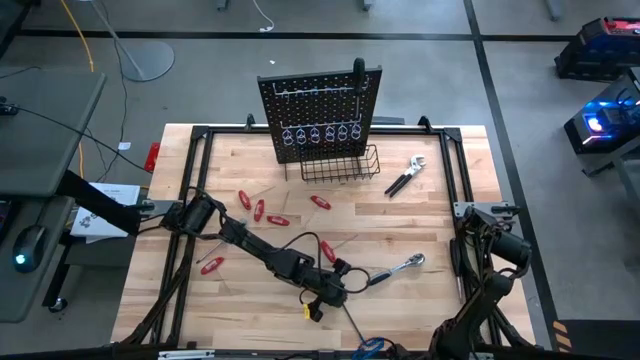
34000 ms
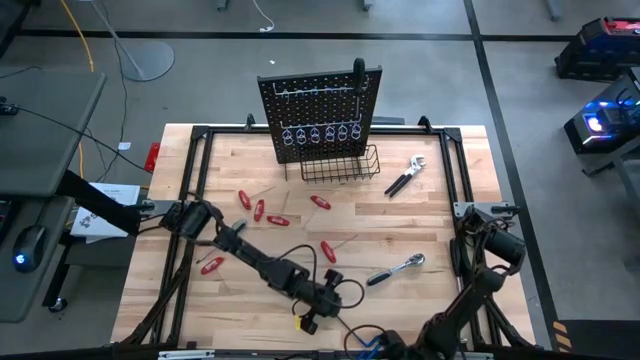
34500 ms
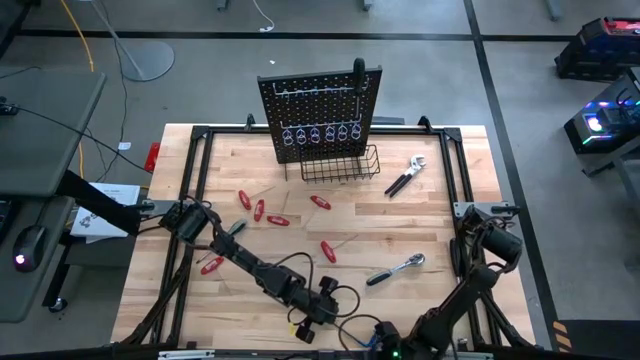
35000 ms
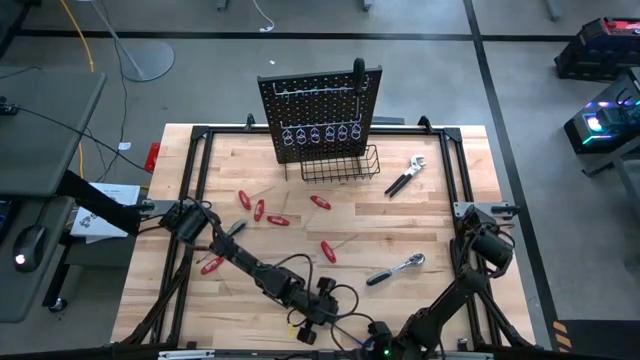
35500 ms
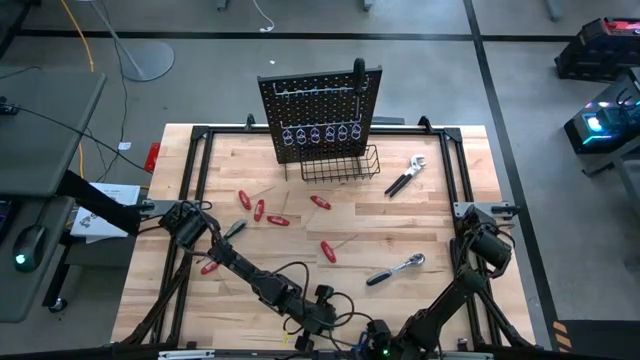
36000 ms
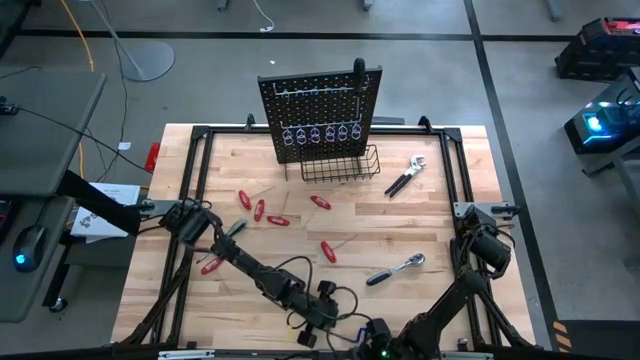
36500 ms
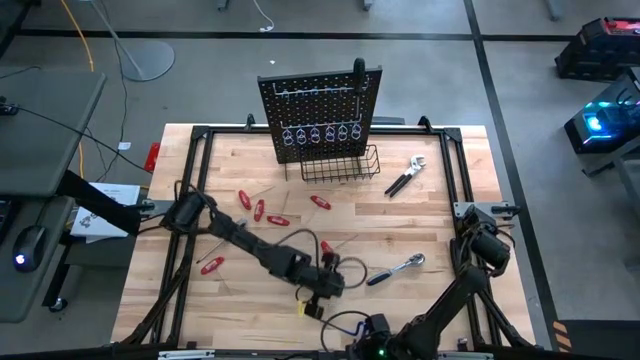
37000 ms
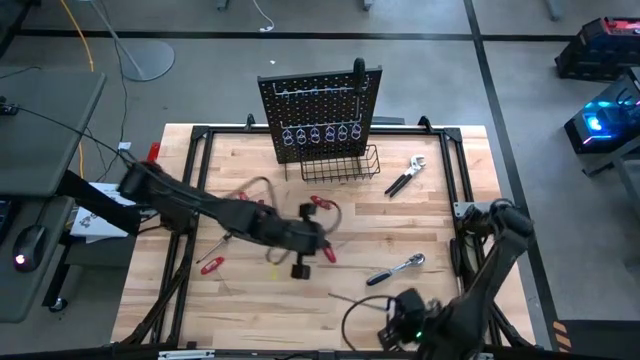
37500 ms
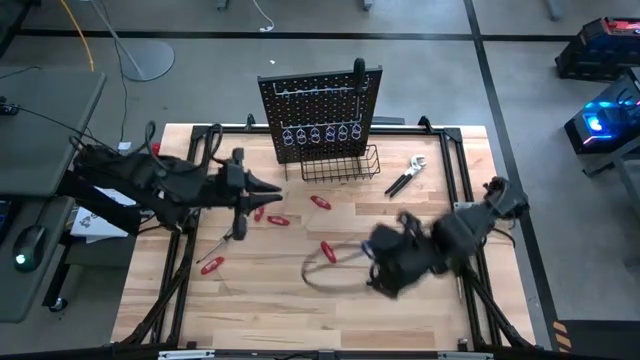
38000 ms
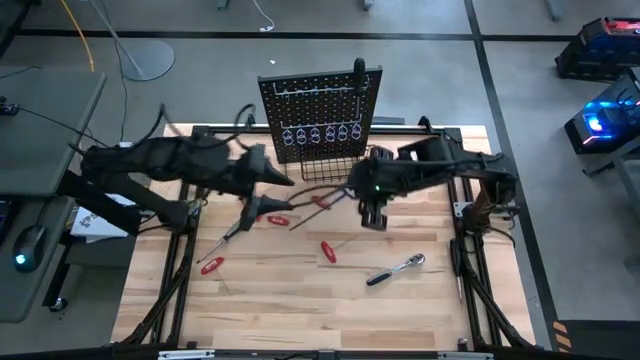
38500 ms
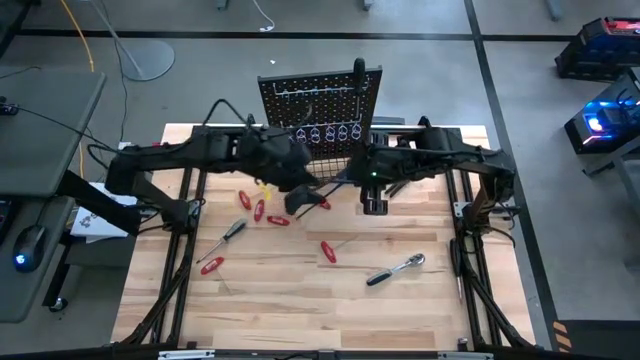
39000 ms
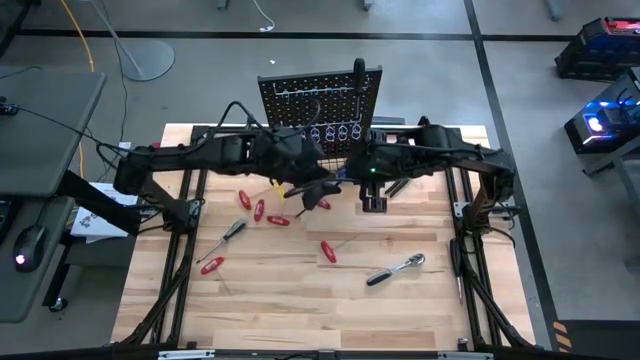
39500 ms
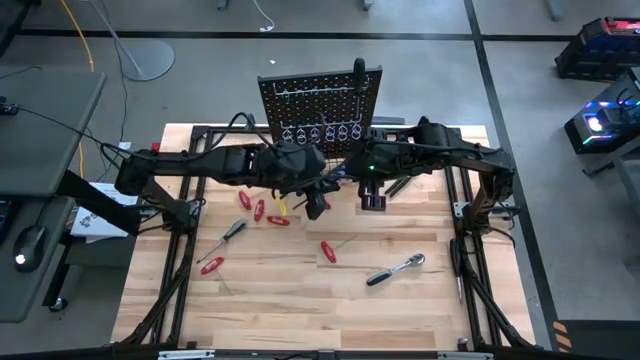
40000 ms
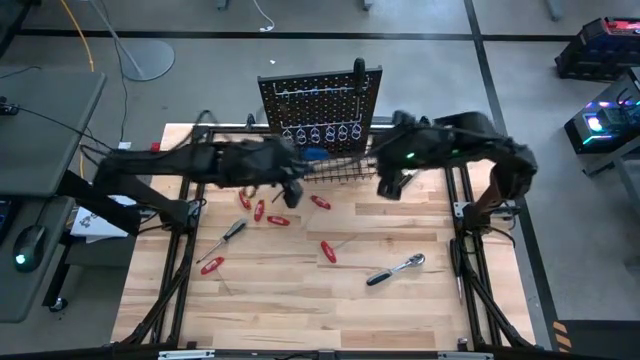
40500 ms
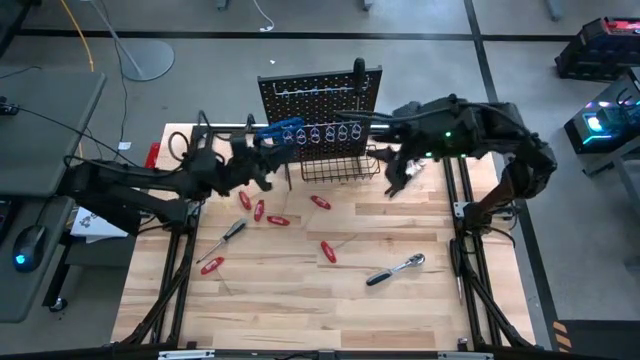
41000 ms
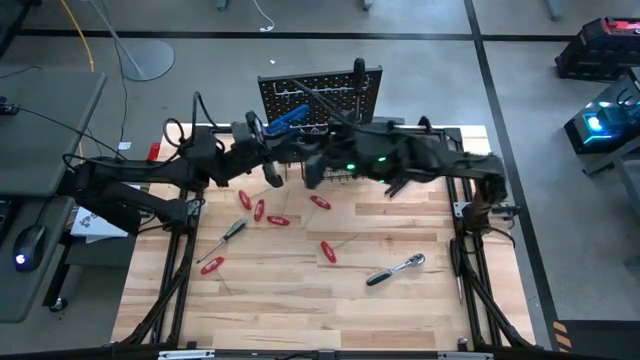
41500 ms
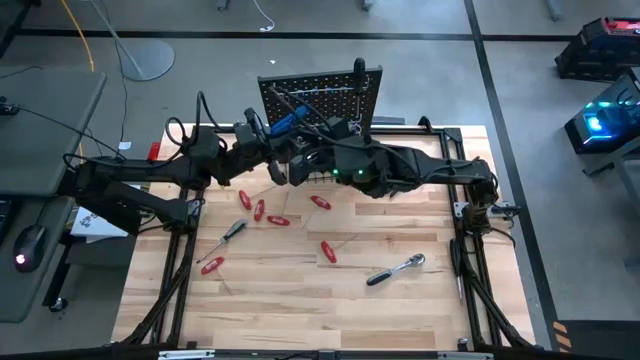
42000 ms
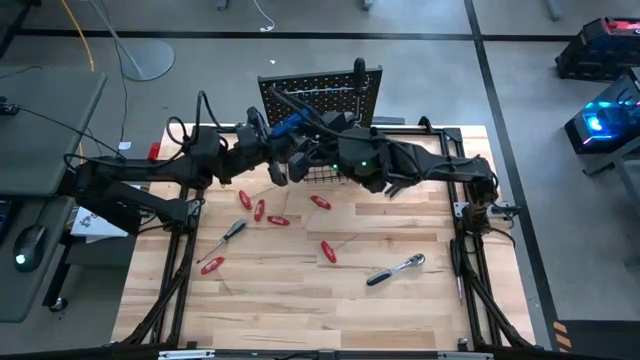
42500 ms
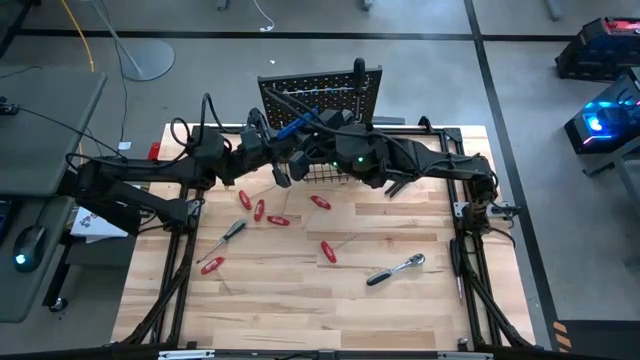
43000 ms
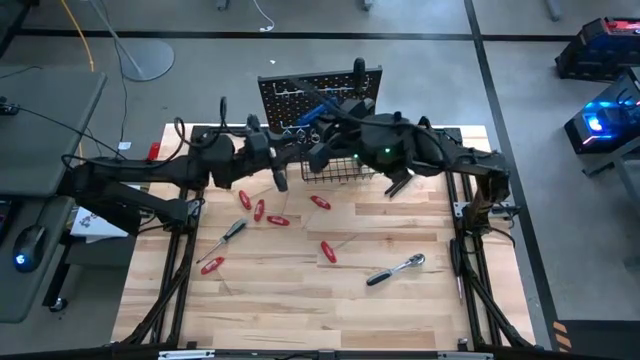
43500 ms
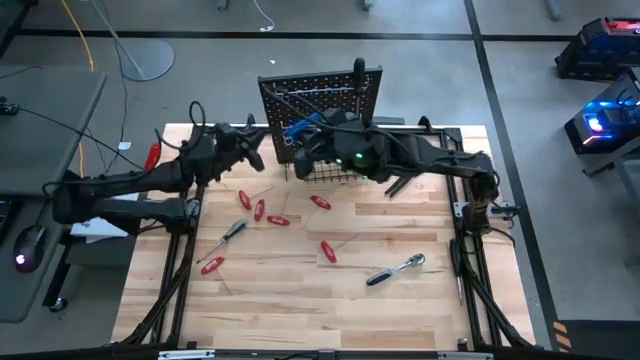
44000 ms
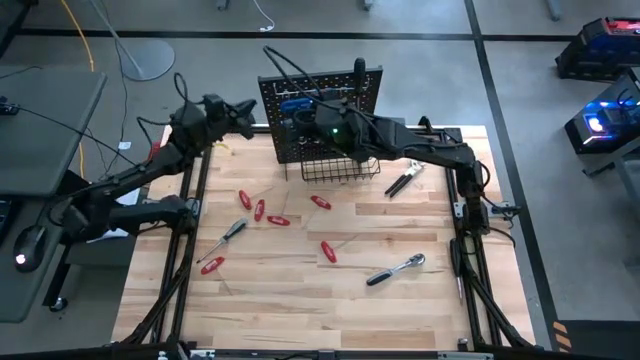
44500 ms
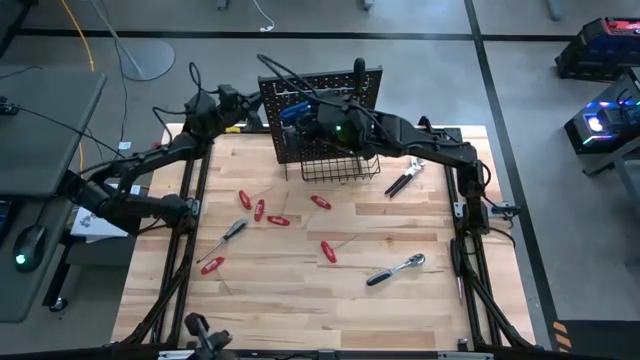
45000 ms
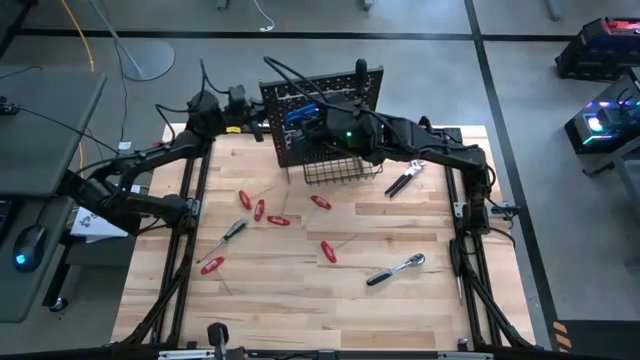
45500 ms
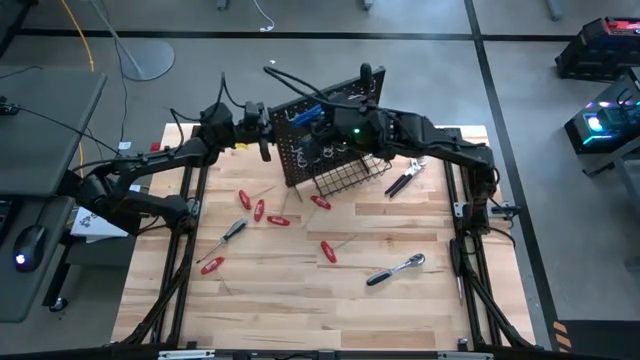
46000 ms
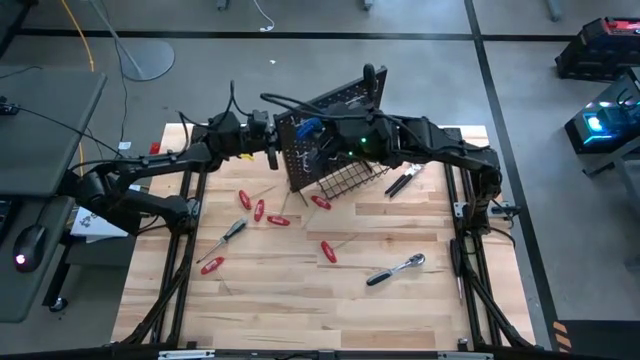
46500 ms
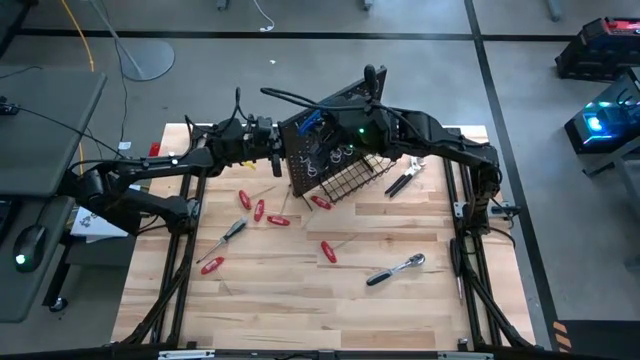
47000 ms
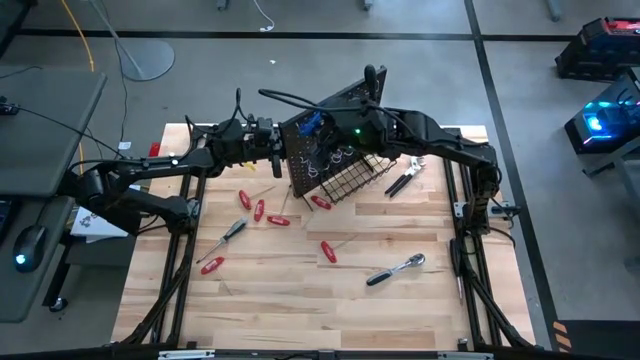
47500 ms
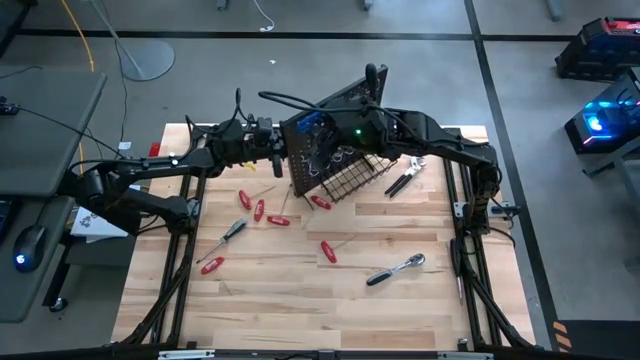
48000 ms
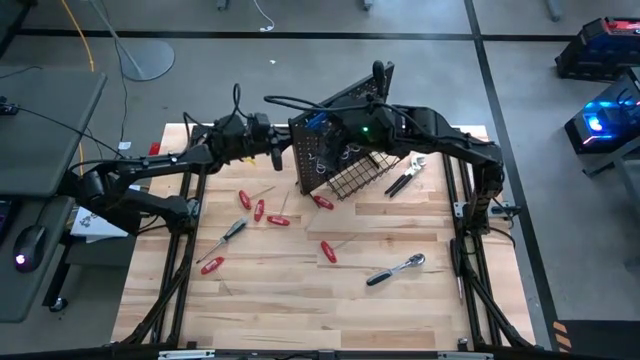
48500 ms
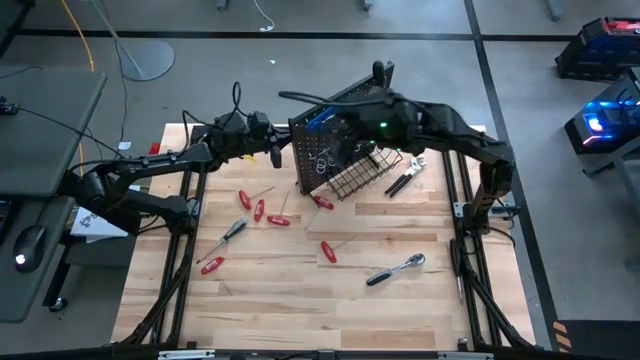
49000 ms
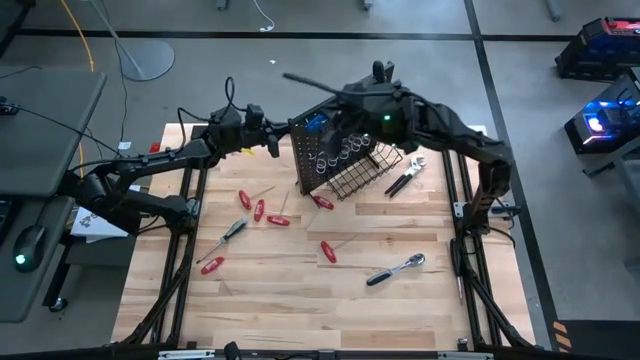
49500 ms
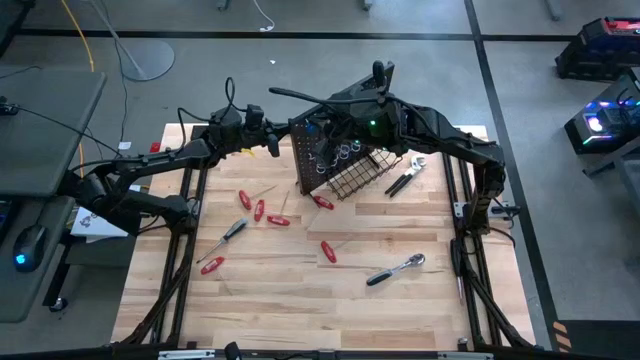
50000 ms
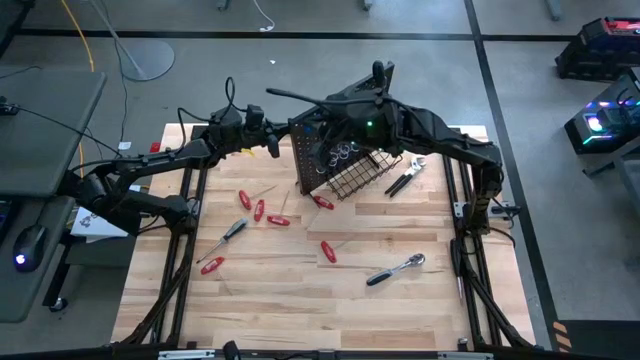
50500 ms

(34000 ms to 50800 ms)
Task: Hang tools onto peg board
Hang the blue pick tool on the peg board

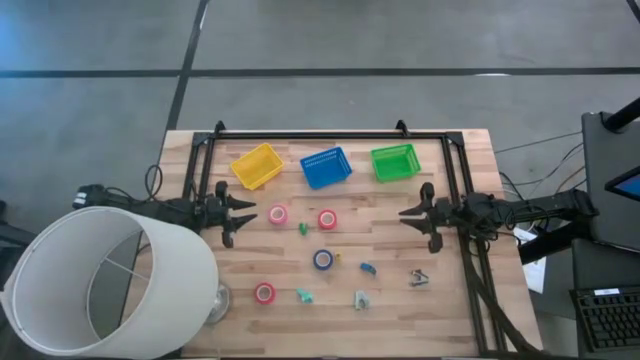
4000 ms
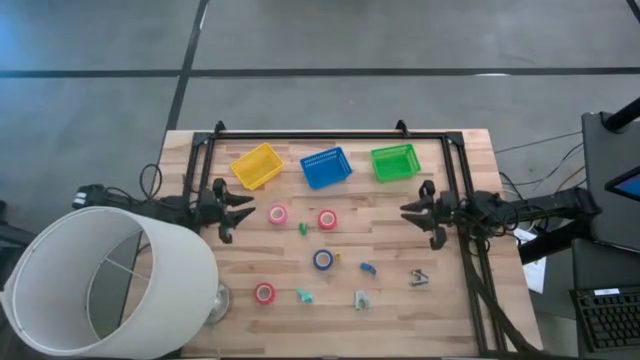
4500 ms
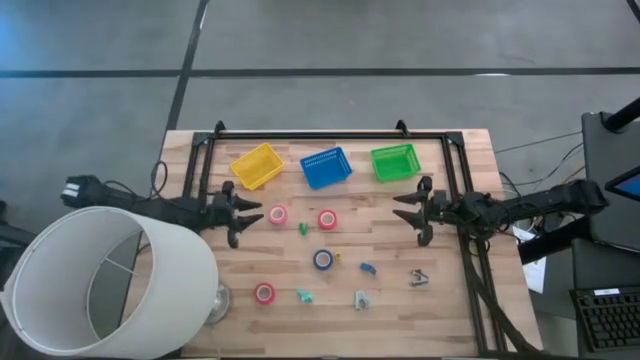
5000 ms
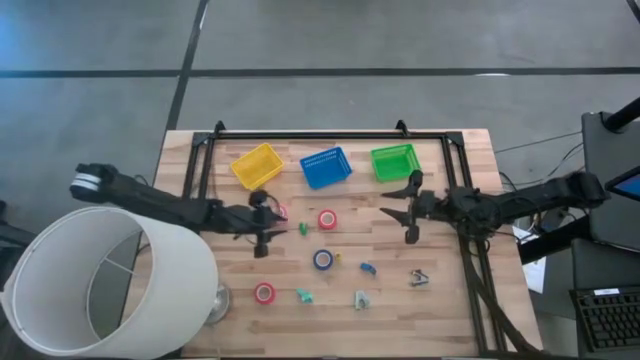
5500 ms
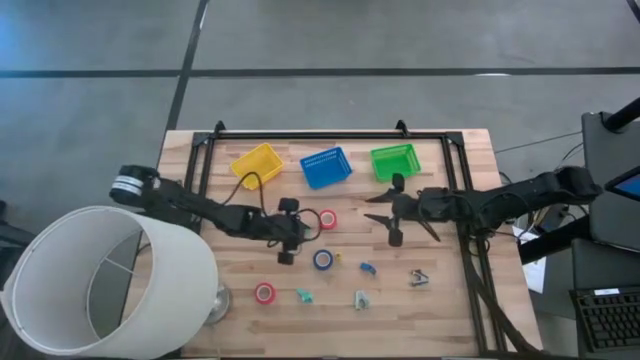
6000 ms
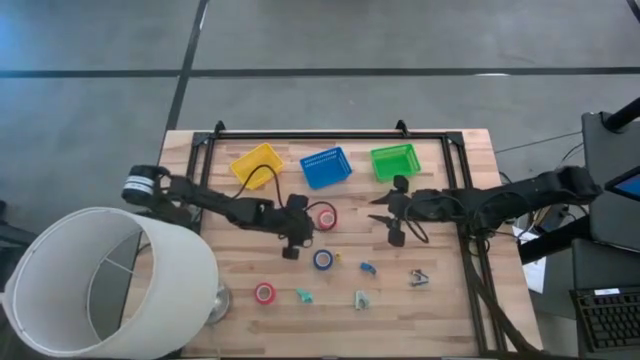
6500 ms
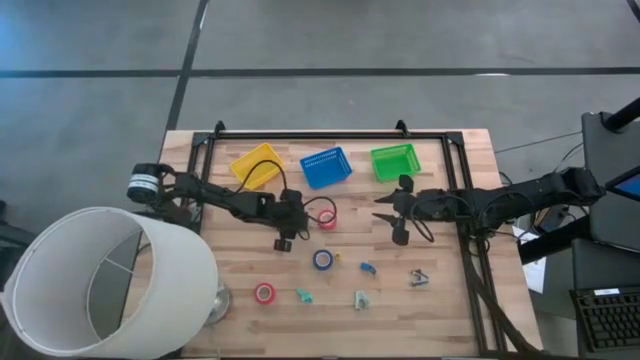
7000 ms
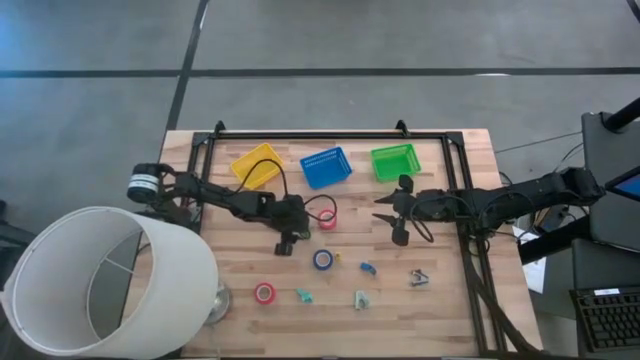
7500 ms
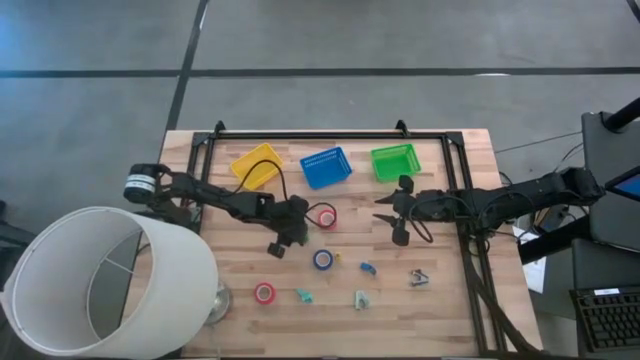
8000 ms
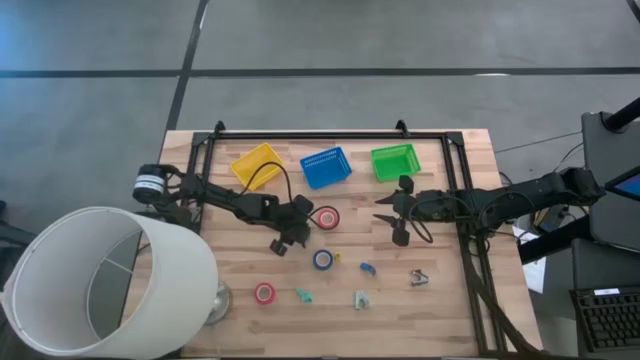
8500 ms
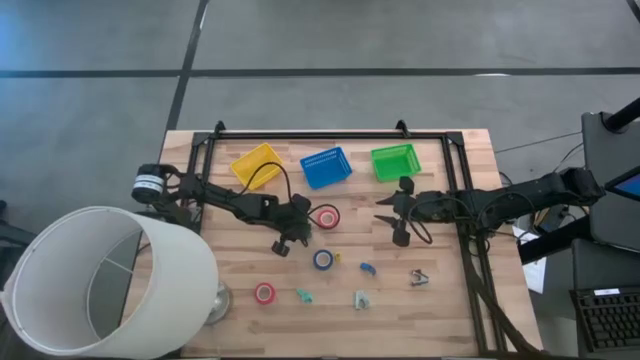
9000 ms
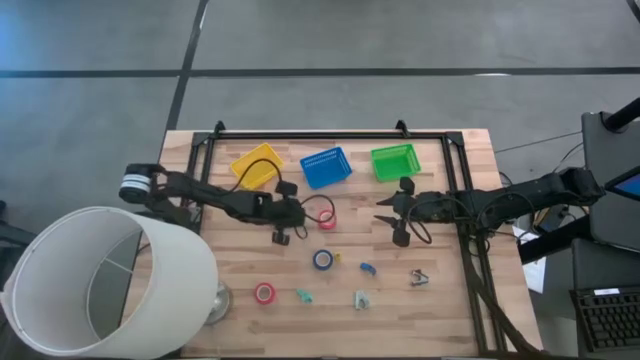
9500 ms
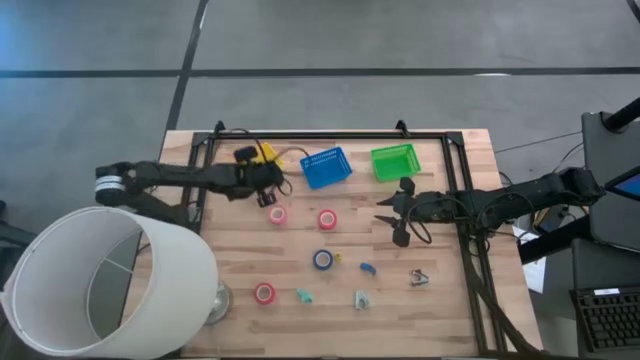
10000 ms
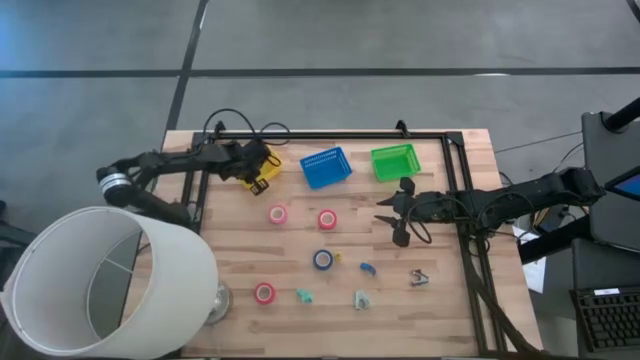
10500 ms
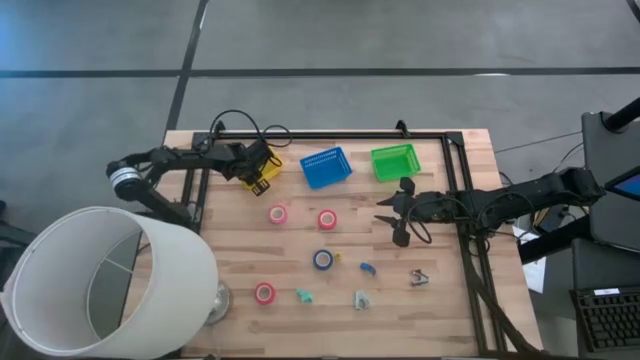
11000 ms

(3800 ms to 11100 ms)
Task: Pick and place Stapler, Stapler remover, tape
Put the green stapler into the yellow basket
